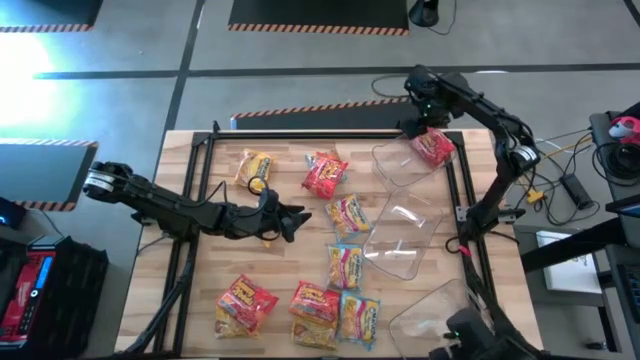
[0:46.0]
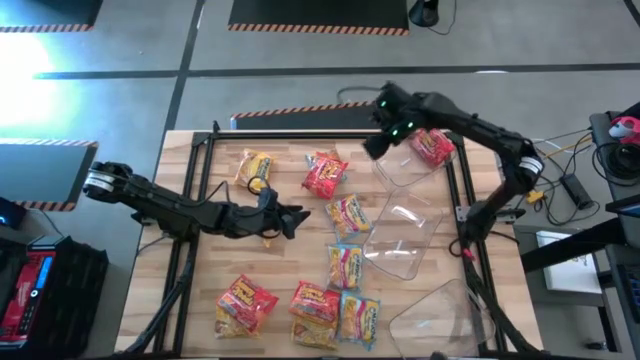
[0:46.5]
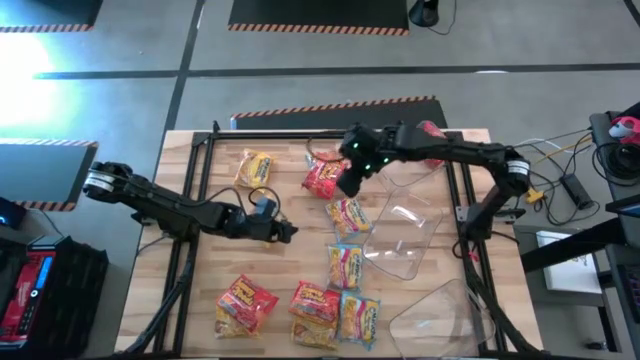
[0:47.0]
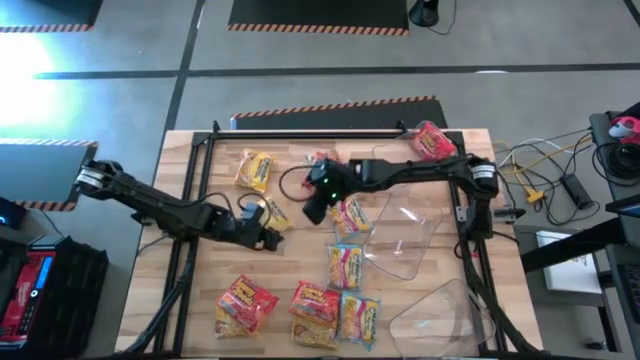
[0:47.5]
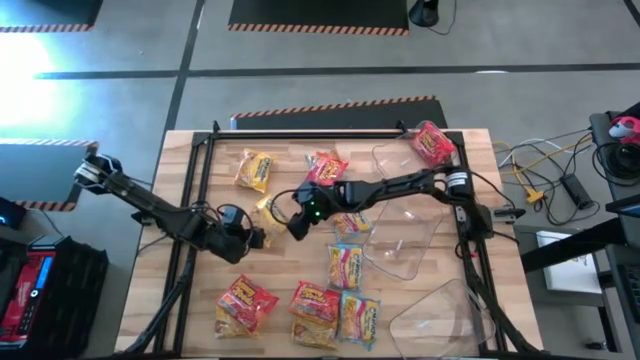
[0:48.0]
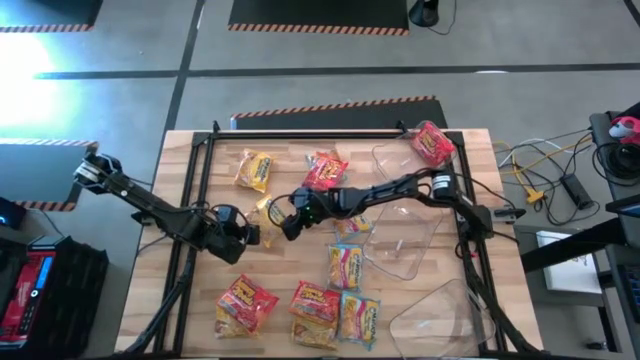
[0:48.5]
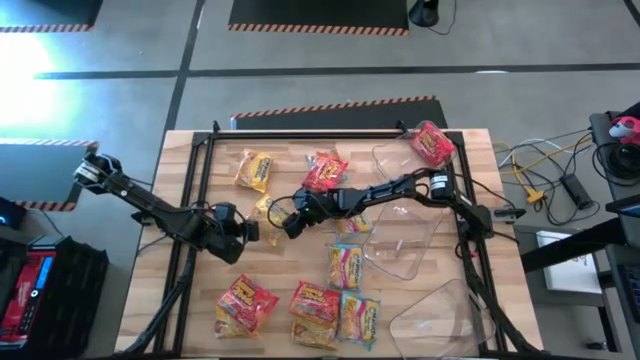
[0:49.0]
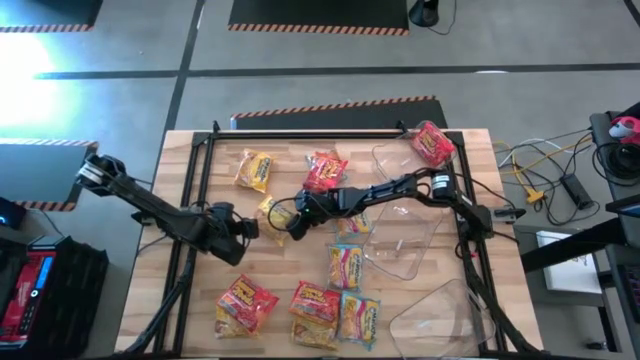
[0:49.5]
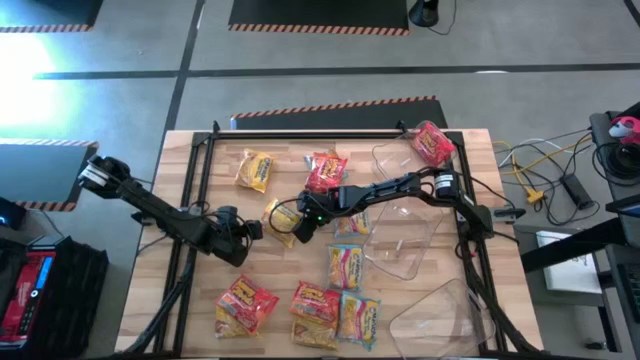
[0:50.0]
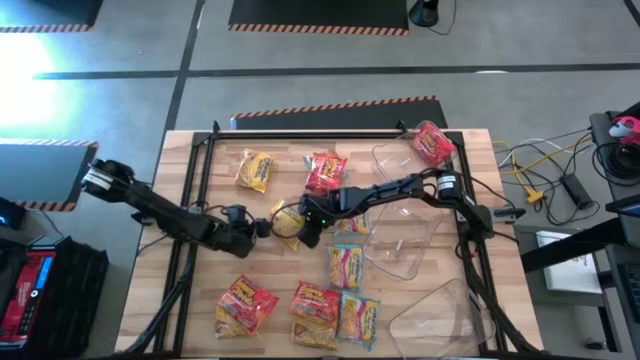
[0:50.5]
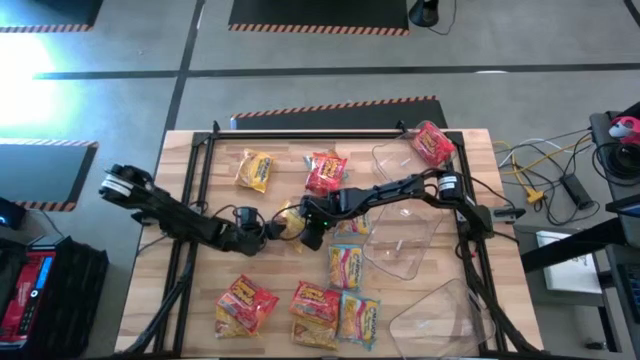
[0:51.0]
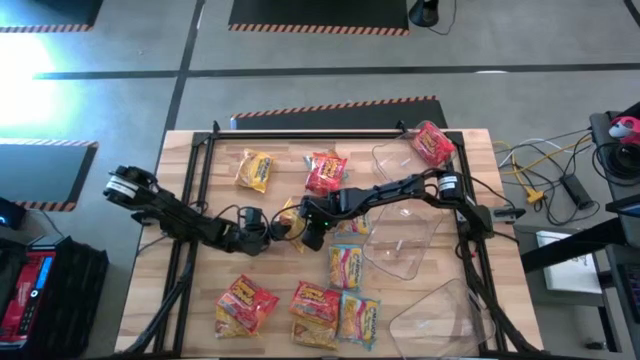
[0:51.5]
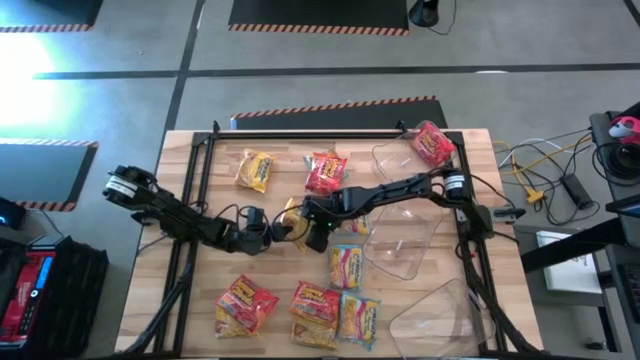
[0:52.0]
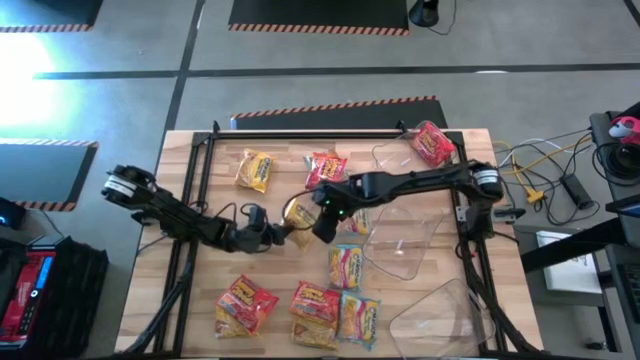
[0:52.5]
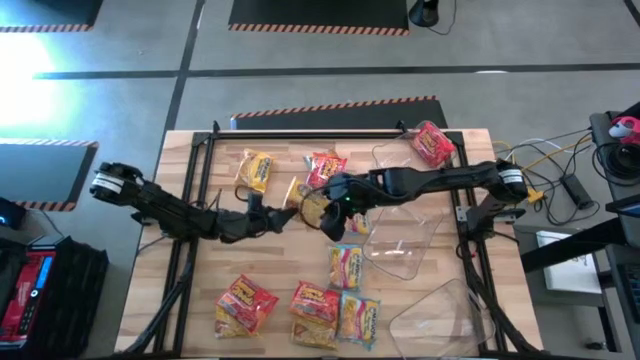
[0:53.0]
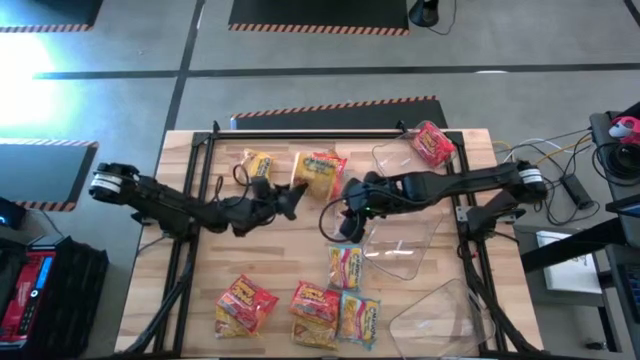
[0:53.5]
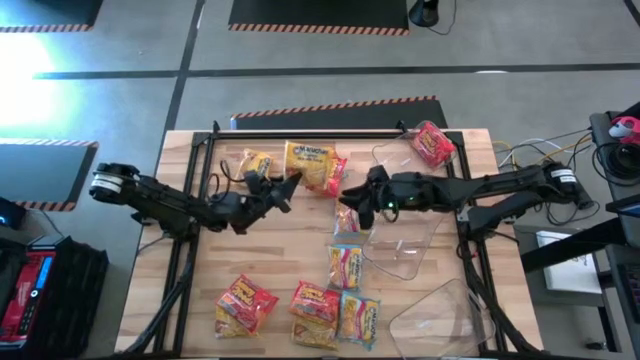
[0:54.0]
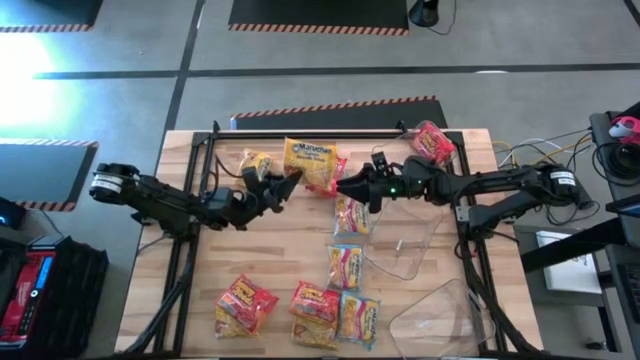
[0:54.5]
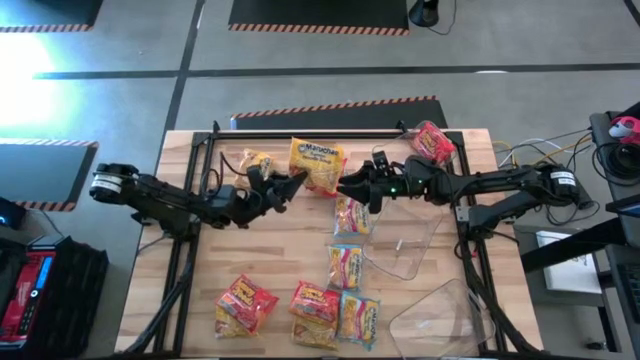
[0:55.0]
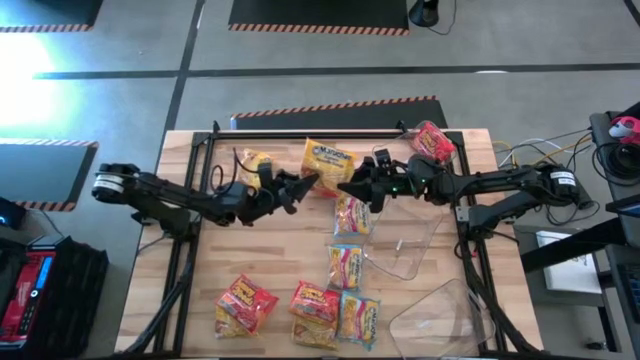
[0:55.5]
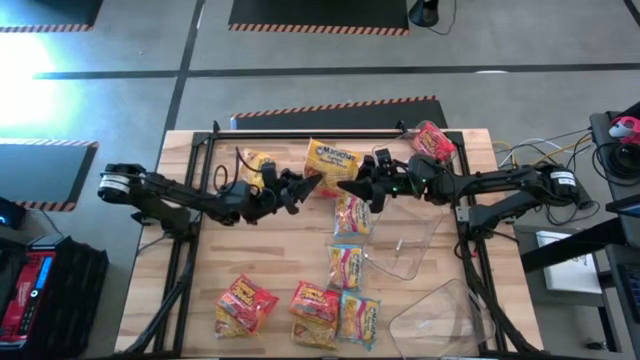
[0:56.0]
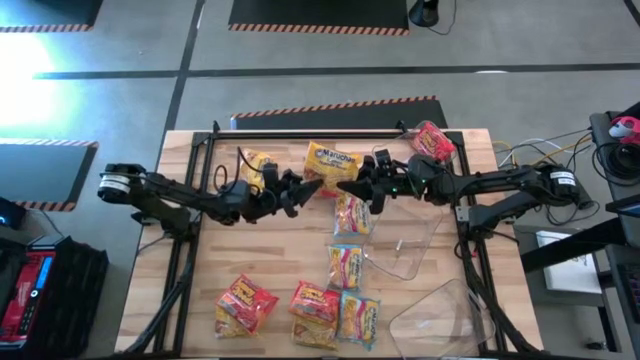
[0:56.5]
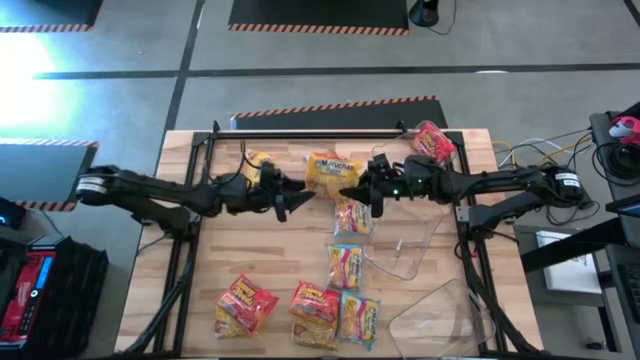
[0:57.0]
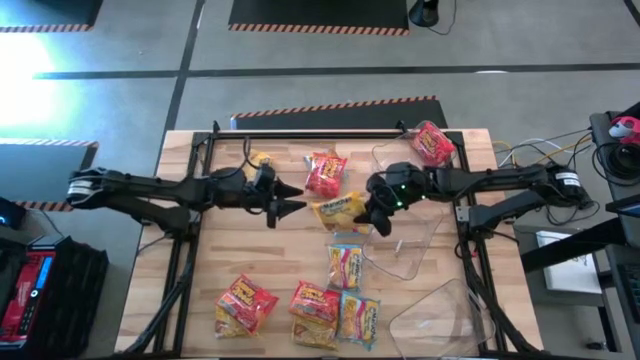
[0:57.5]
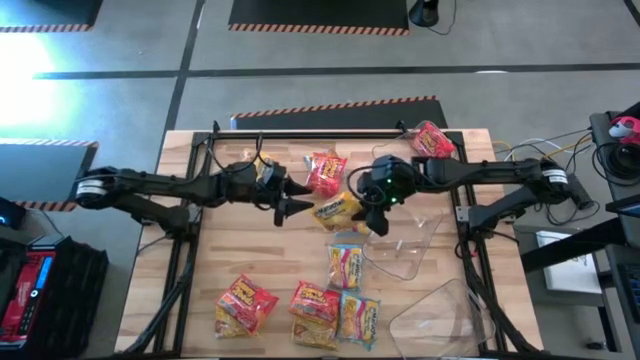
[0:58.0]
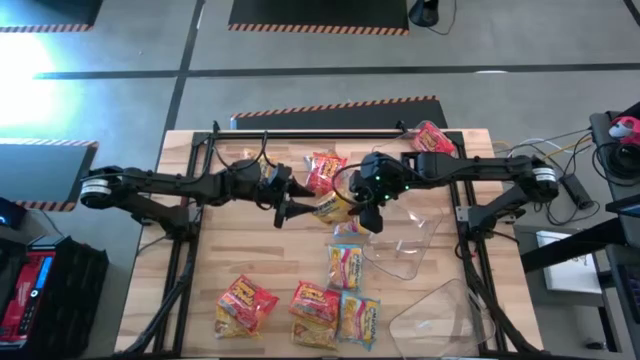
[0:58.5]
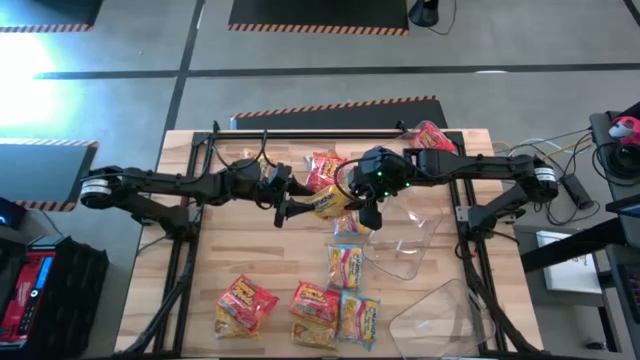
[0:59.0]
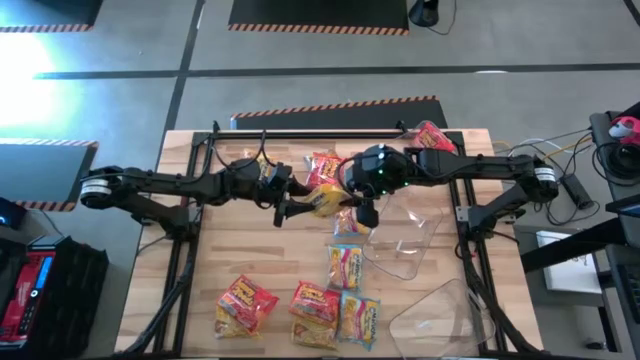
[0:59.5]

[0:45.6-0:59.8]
Task: Sort Maruchan noodles
Put the yellow noodle pack into the middle transparent bin

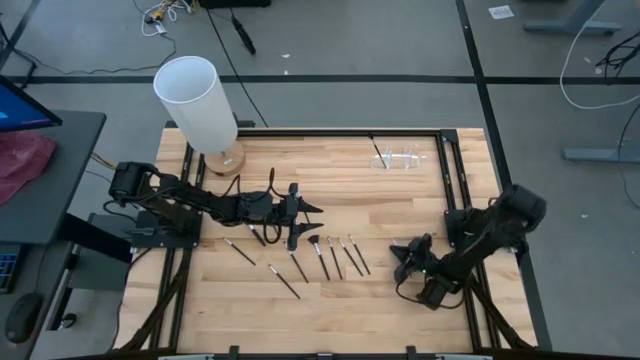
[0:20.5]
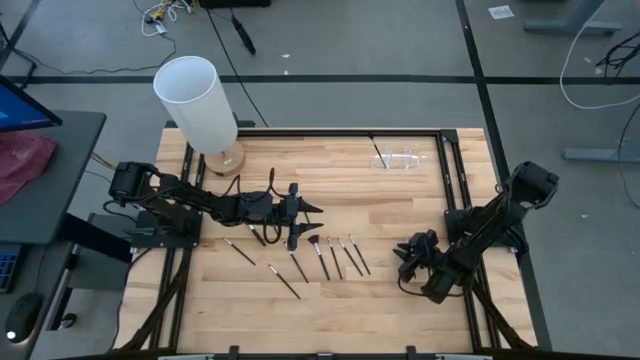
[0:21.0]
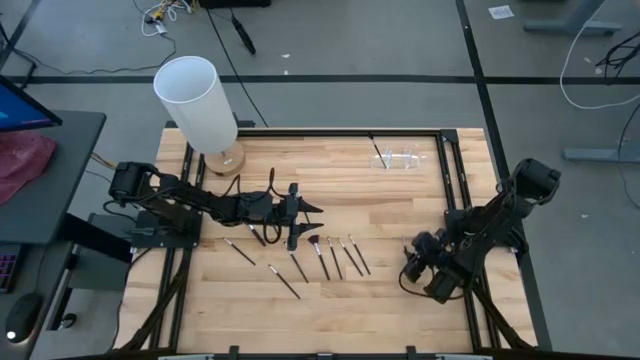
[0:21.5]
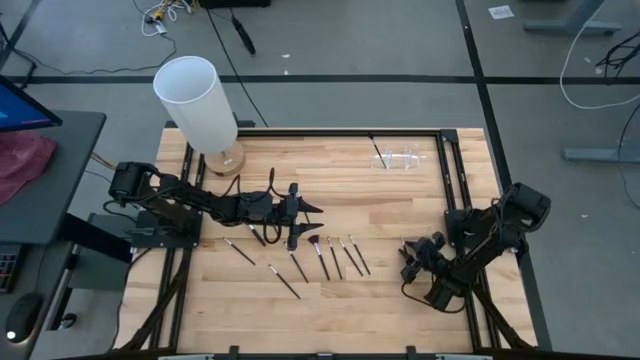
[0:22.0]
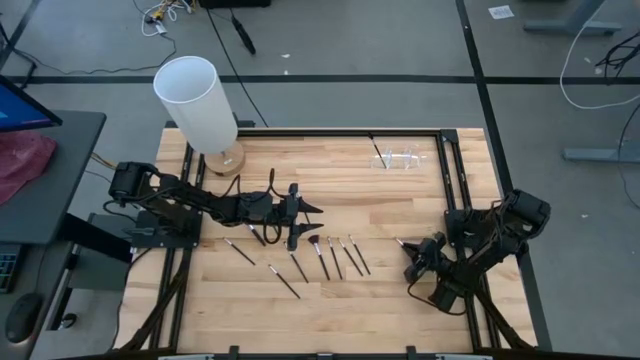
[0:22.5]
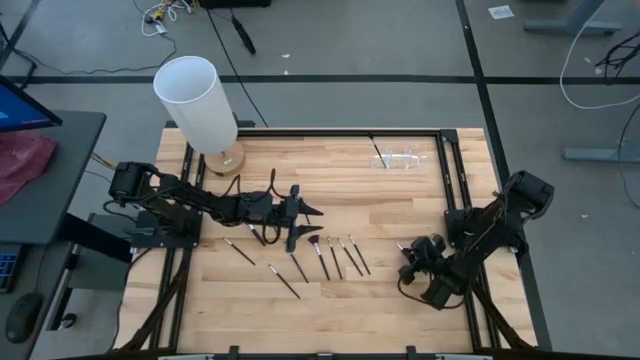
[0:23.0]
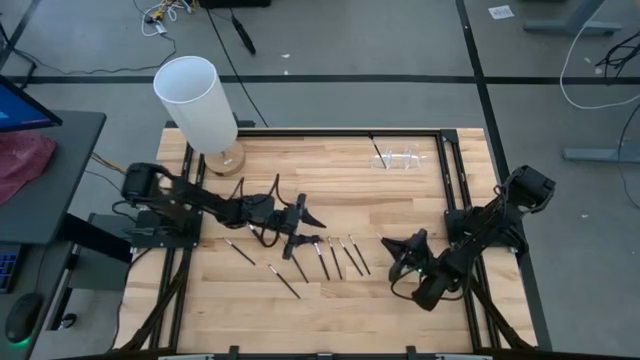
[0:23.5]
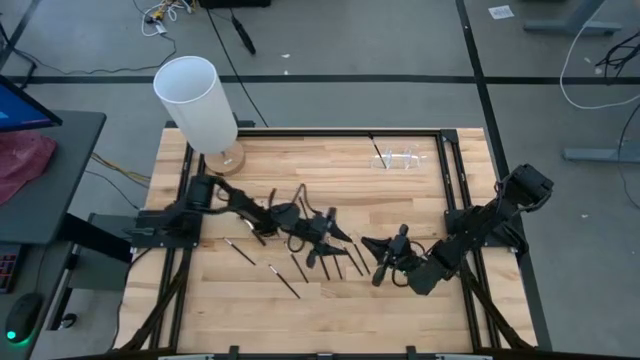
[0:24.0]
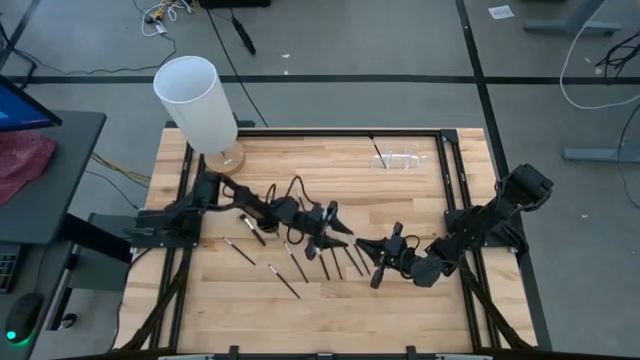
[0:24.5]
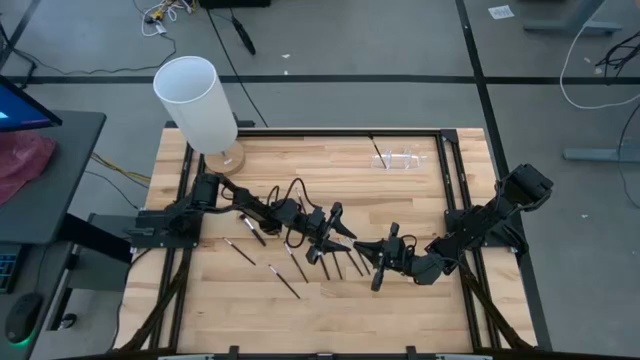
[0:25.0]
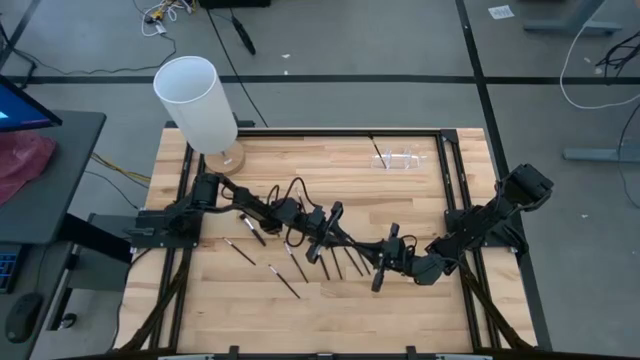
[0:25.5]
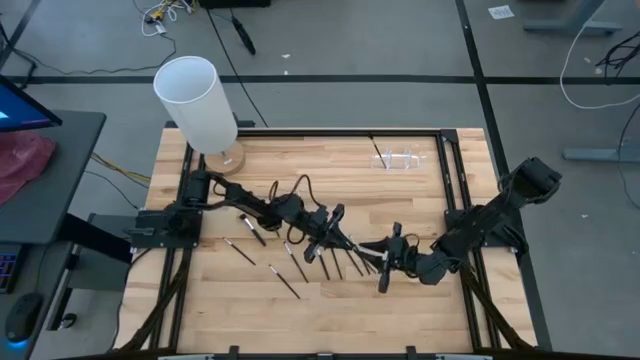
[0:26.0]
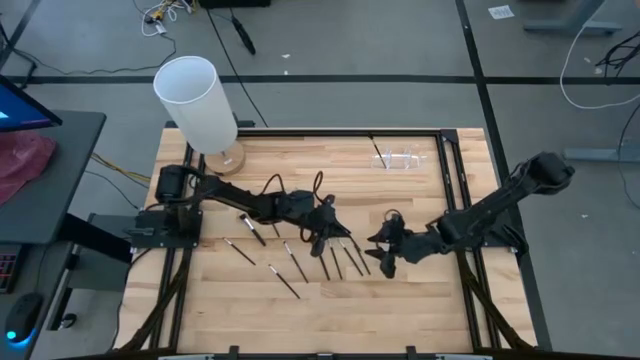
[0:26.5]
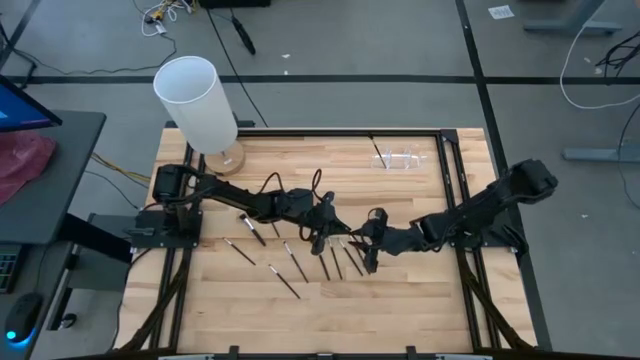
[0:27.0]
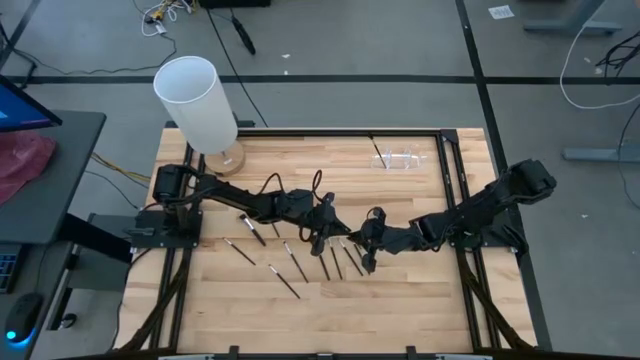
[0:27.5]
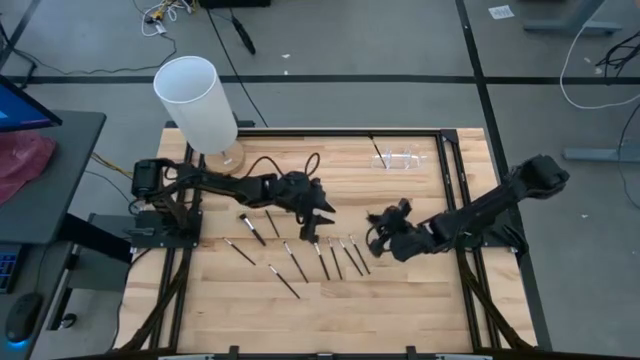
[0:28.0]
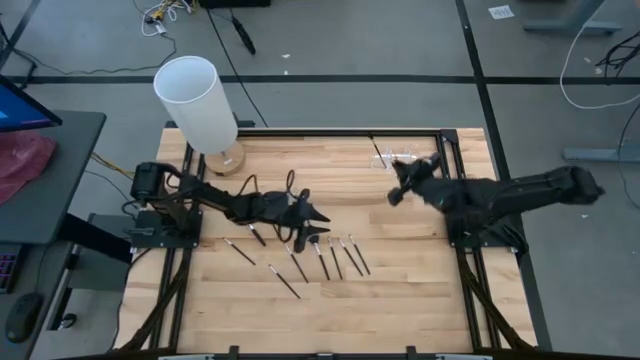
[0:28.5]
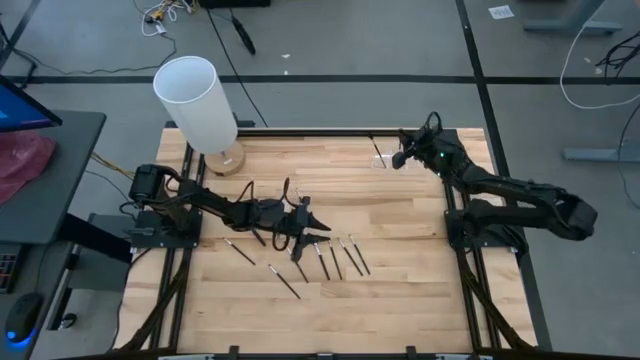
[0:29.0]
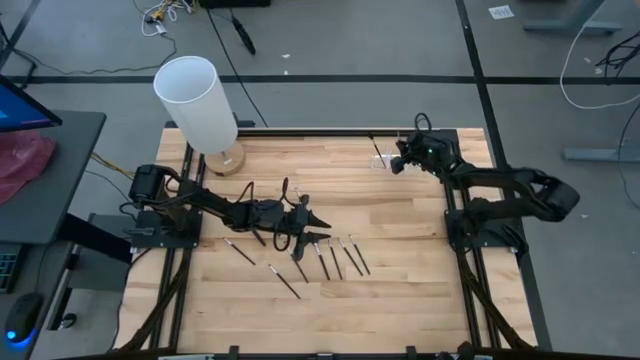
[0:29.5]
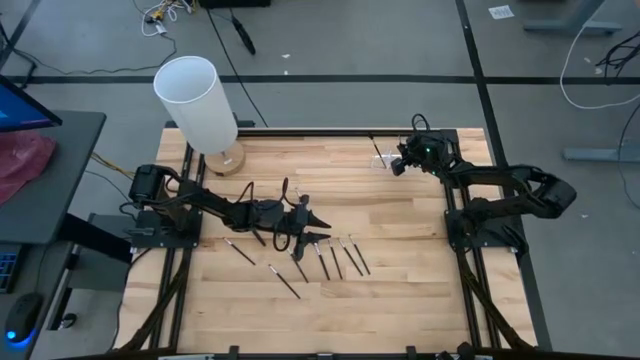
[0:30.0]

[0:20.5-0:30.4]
Task: Put items in baskets/containers
Put the liner brush into the transparent organizer
